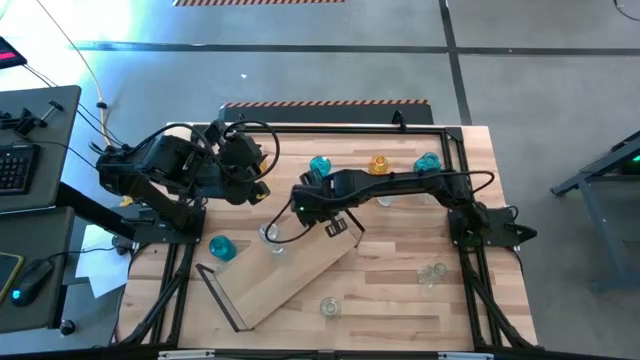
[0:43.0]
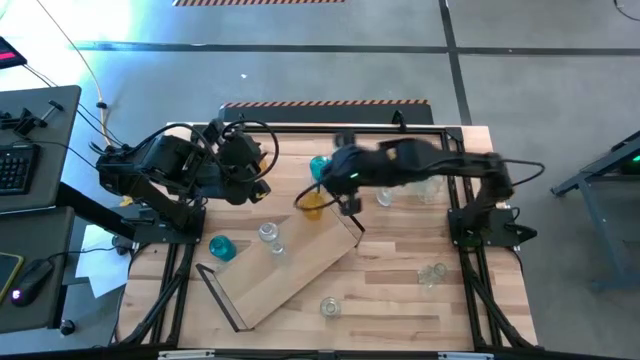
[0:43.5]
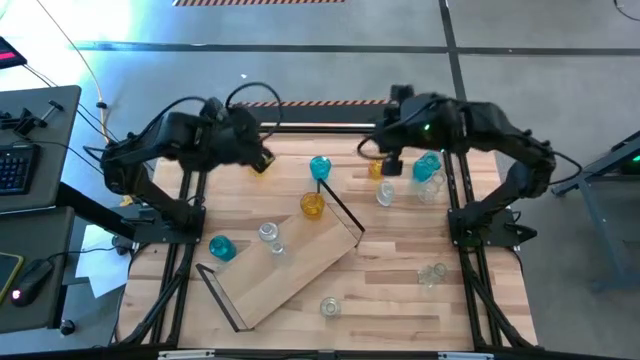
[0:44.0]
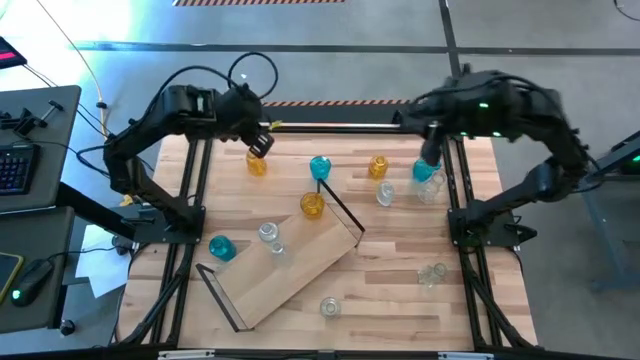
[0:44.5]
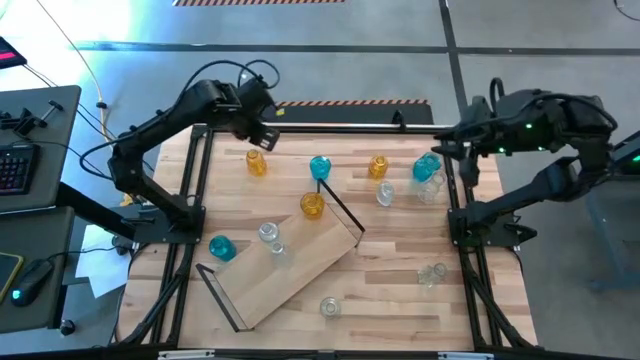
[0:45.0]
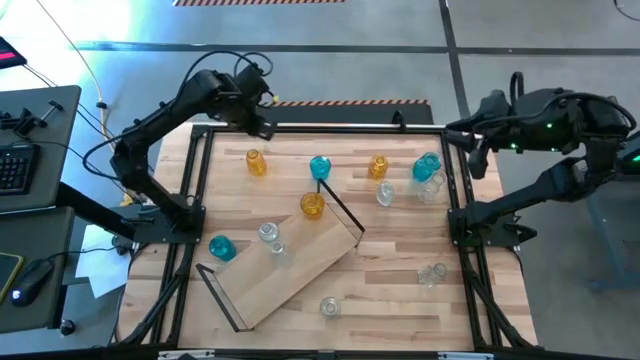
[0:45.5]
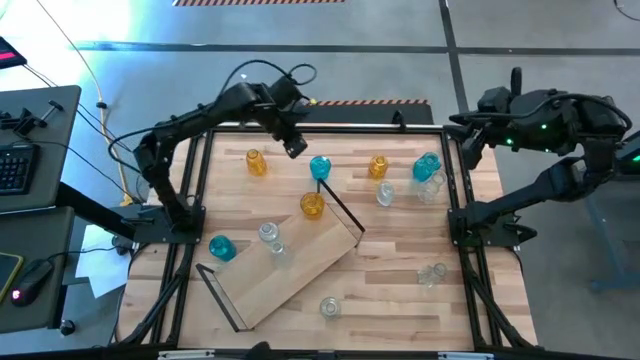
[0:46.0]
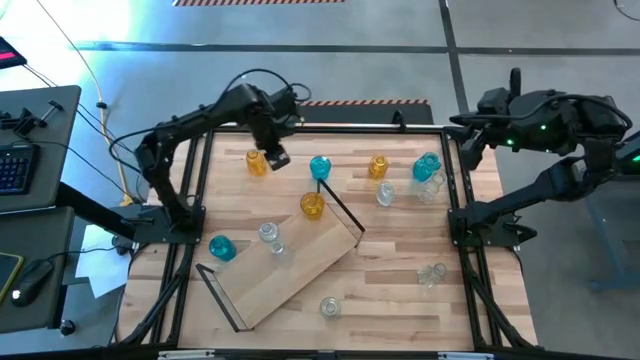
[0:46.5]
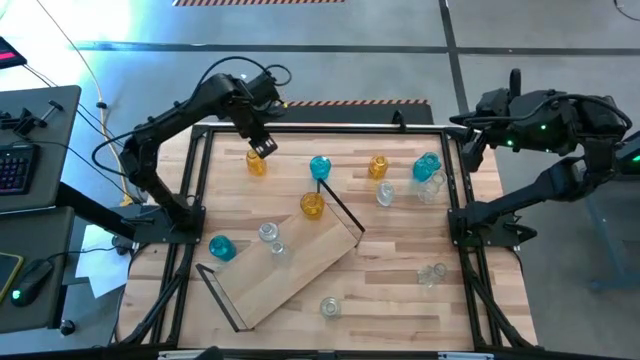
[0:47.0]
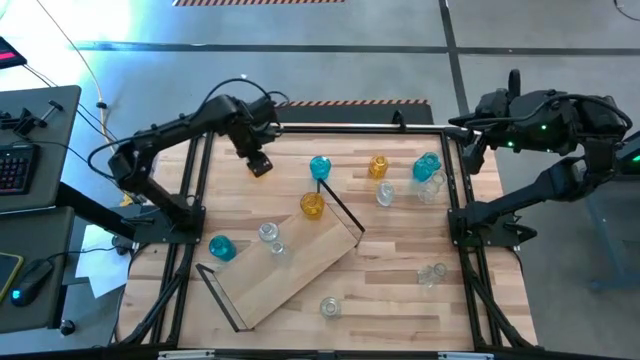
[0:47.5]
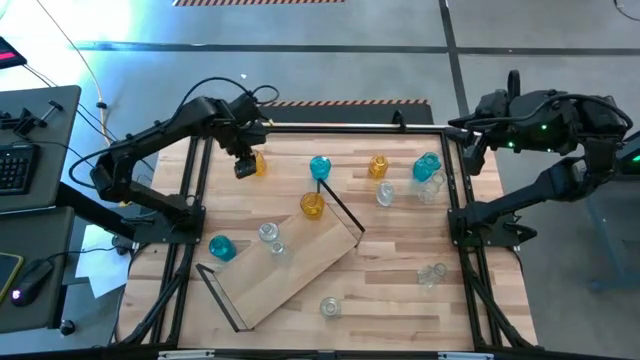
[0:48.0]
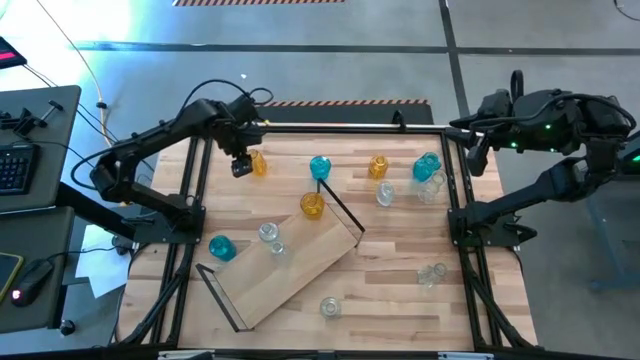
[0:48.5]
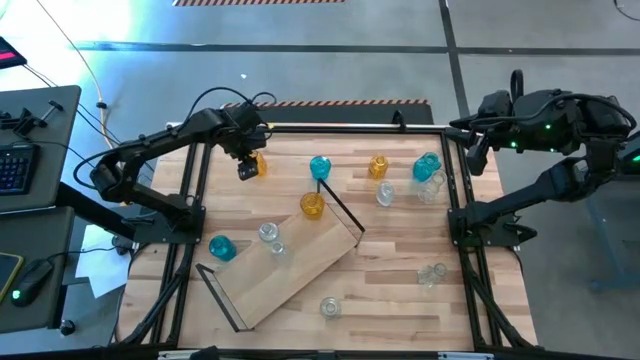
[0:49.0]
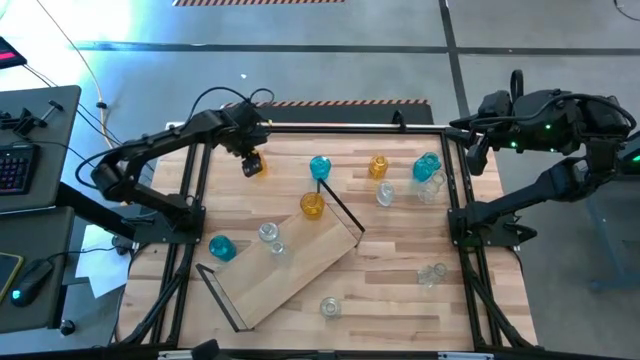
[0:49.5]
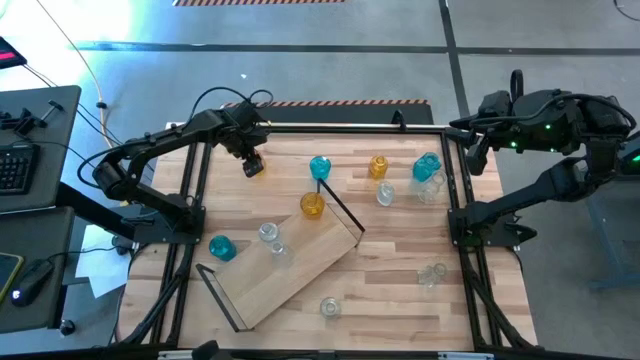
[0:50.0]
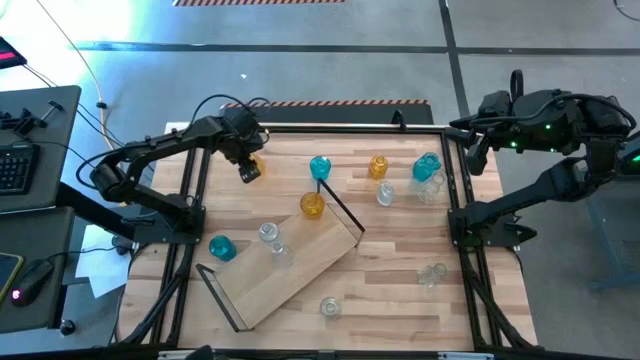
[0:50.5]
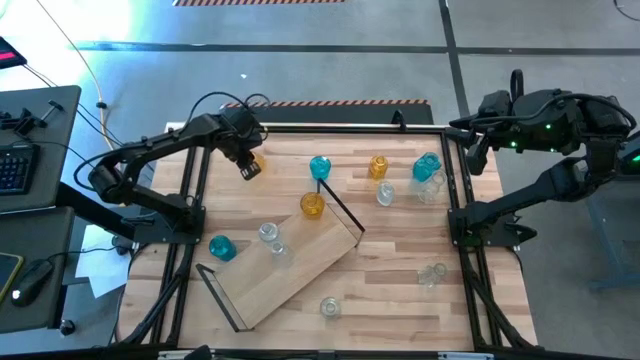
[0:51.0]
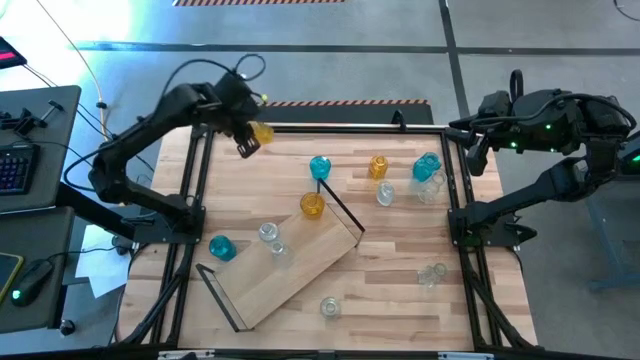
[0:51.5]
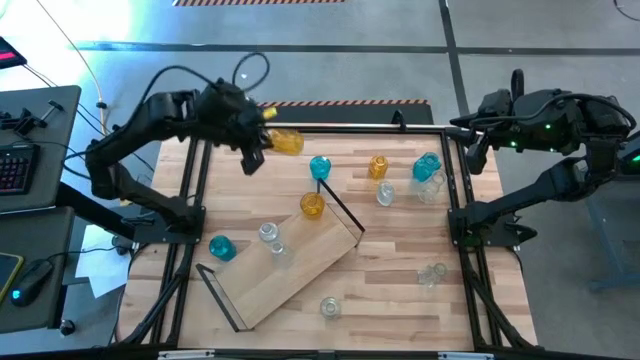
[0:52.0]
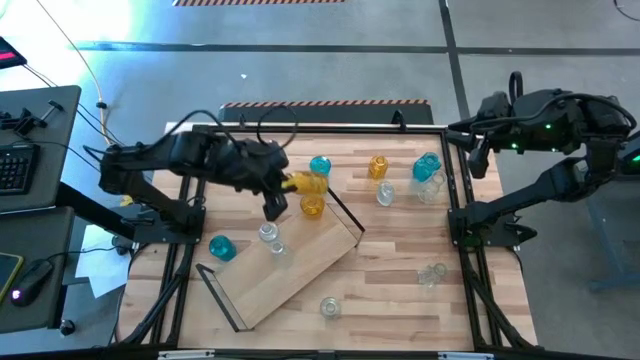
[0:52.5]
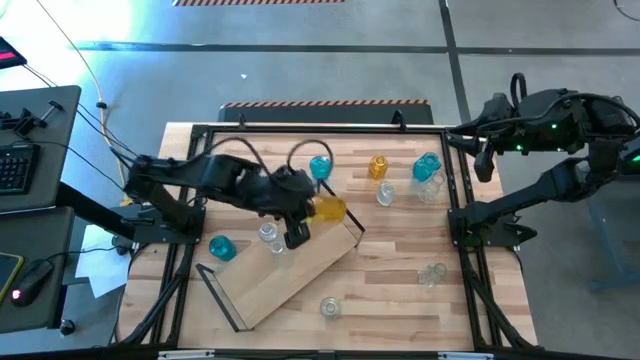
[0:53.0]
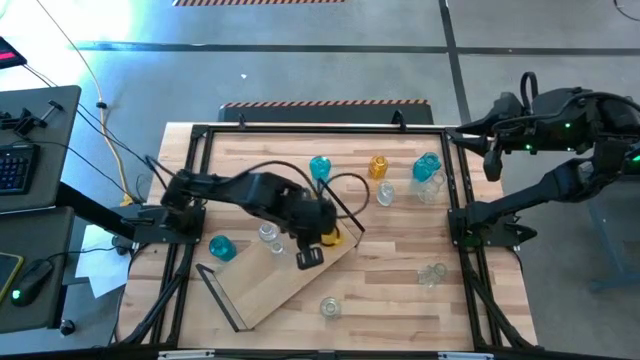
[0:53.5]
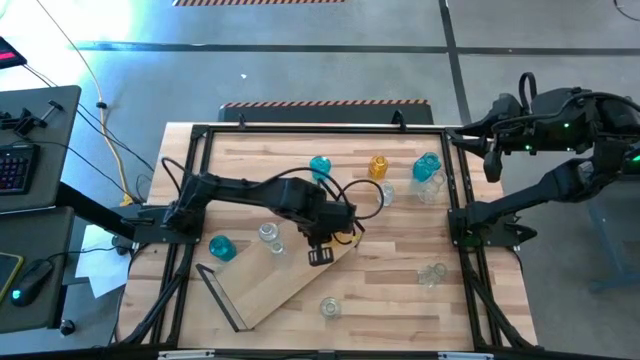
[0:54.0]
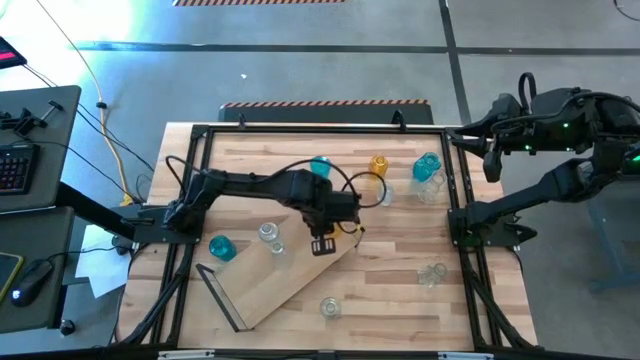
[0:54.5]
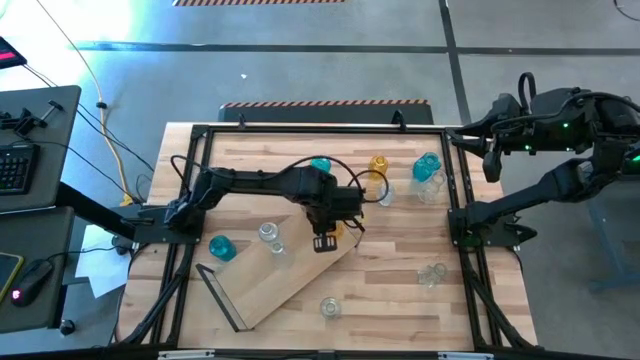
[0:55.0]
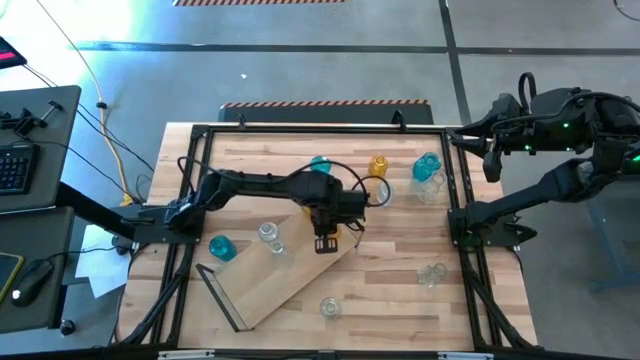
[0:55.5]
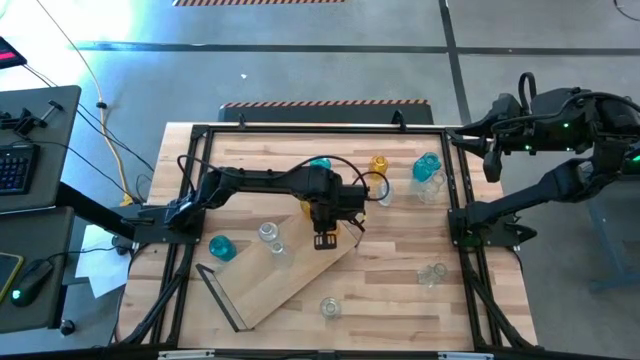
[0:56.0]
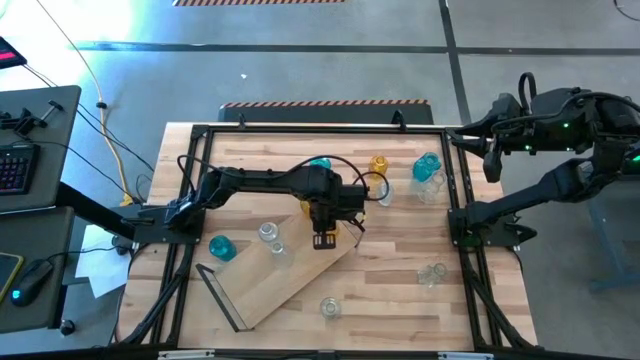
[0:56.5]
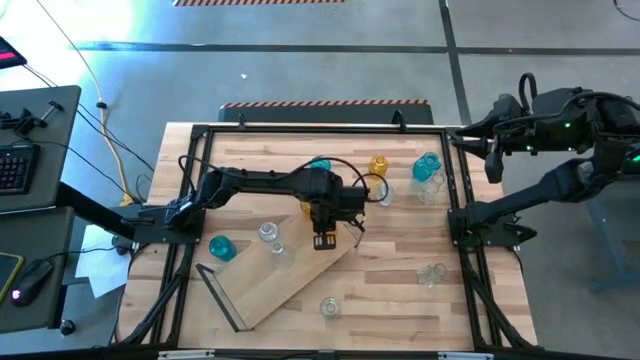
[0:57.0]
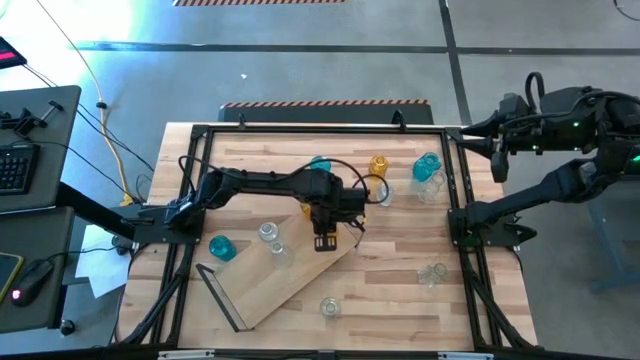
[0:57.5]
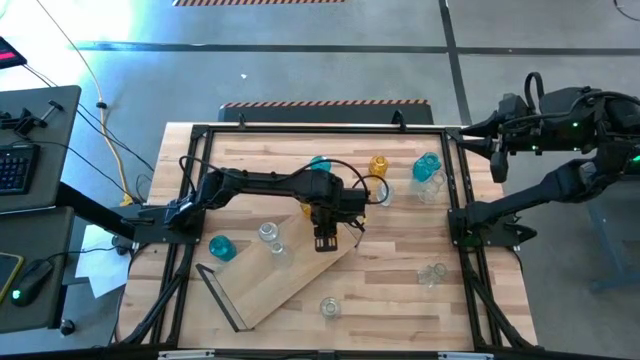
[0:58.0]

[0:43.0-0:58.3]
Task: sort vases onto shelf
Put the yellow vase on the shelf aligned with the other yellow vase

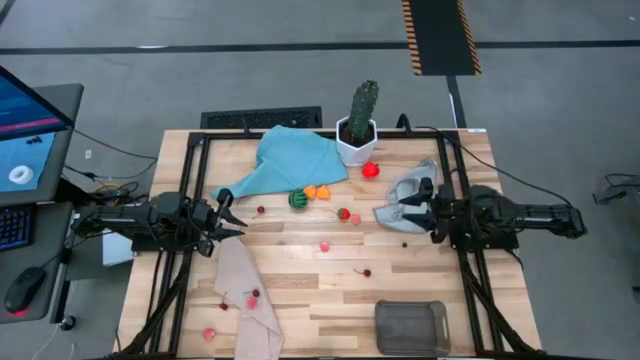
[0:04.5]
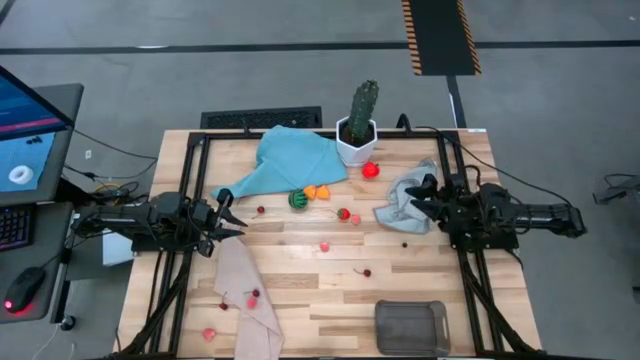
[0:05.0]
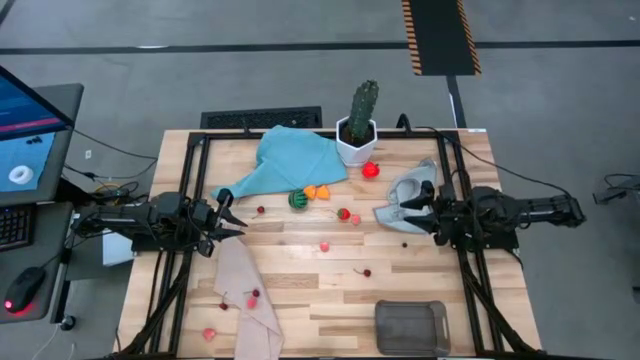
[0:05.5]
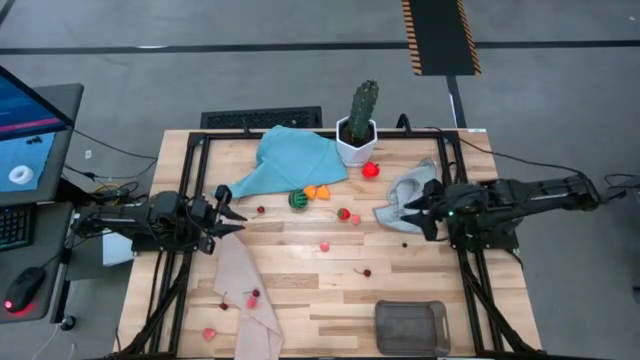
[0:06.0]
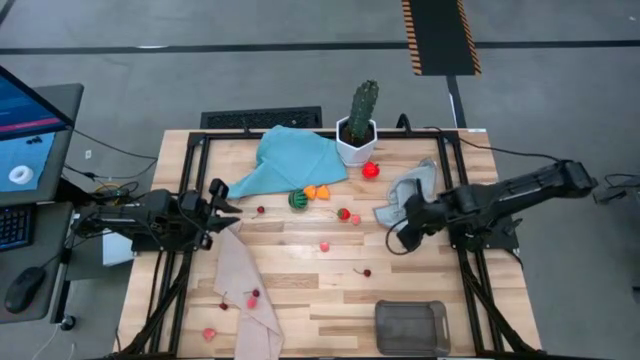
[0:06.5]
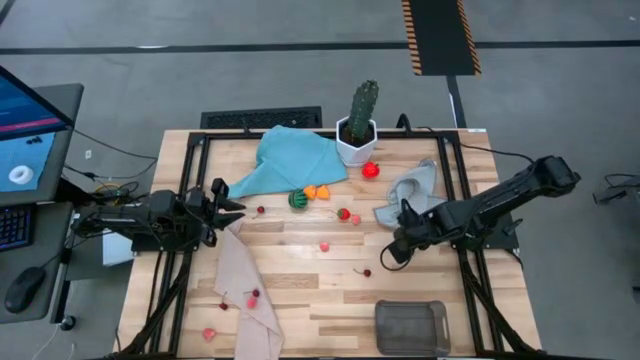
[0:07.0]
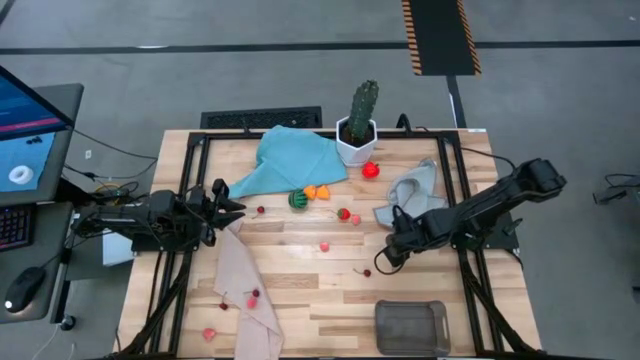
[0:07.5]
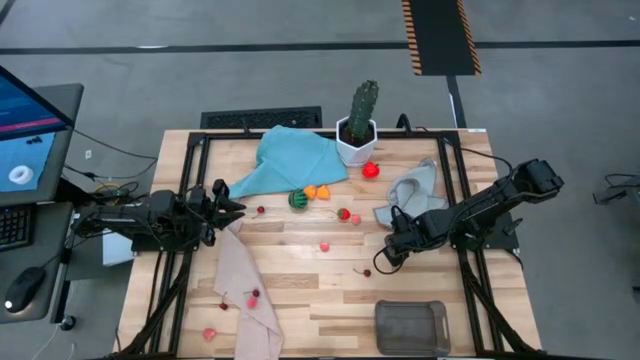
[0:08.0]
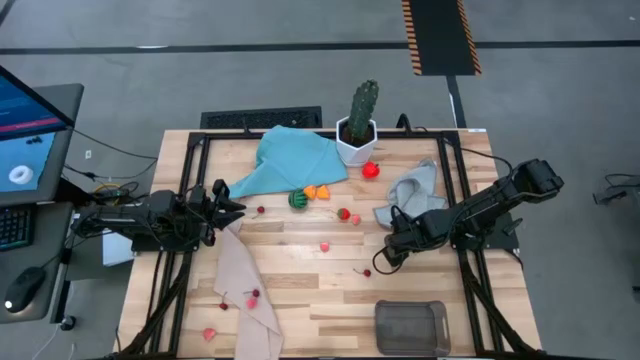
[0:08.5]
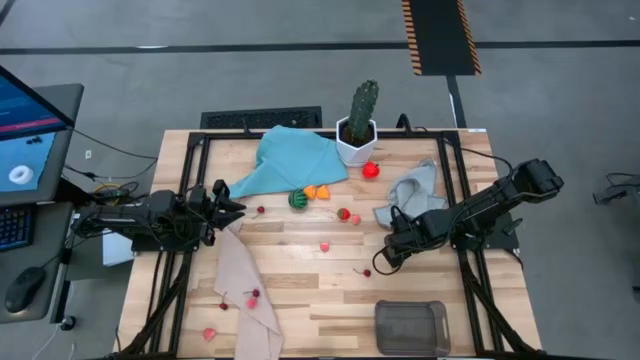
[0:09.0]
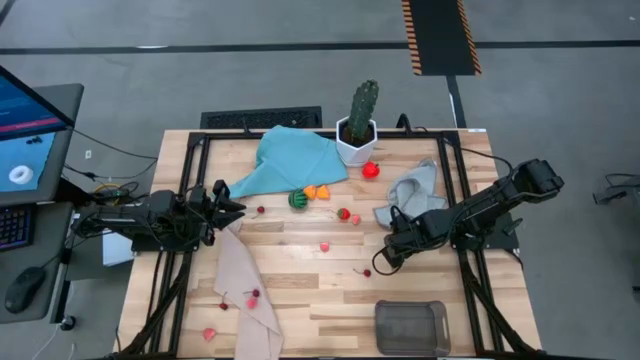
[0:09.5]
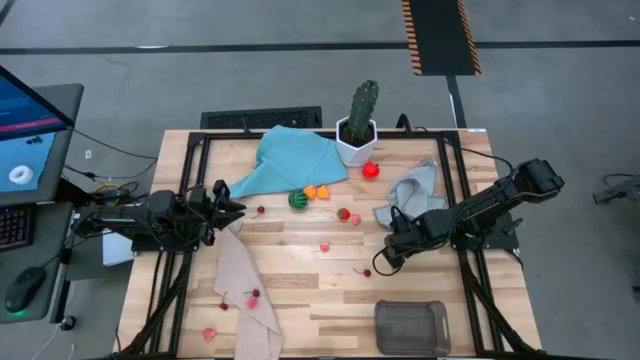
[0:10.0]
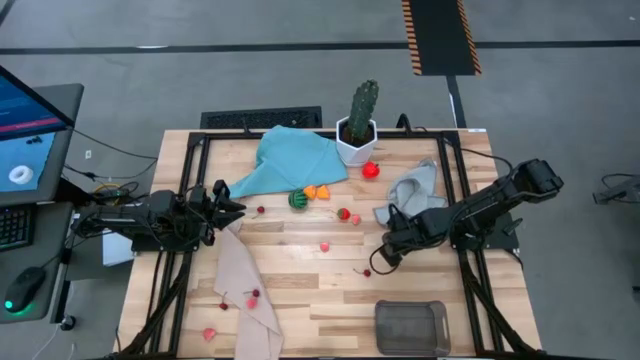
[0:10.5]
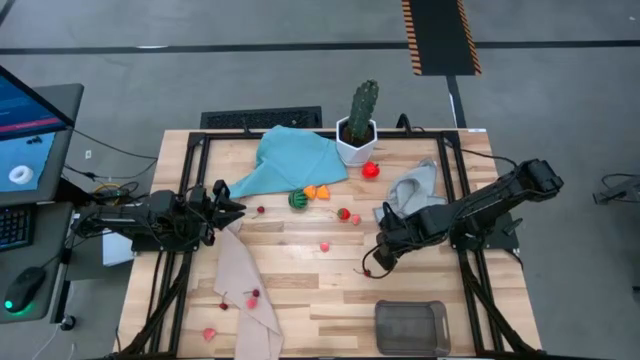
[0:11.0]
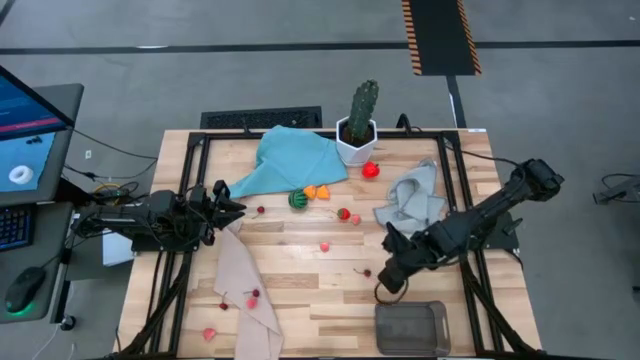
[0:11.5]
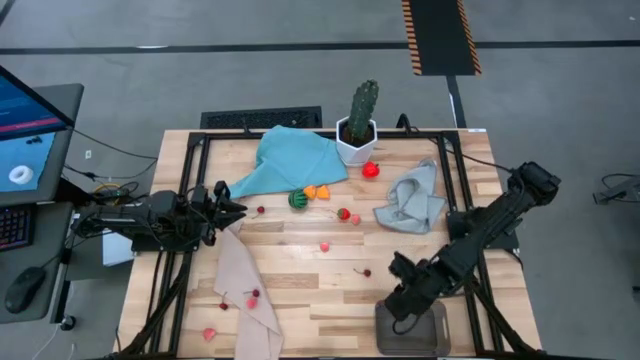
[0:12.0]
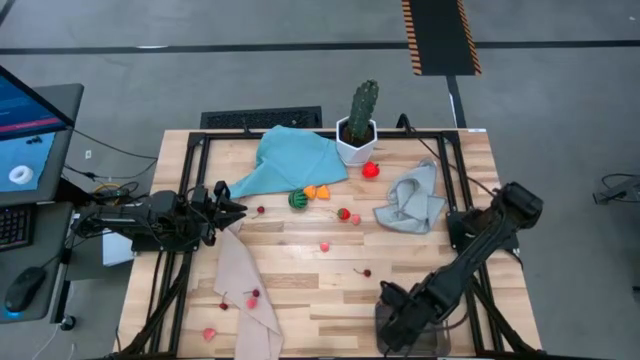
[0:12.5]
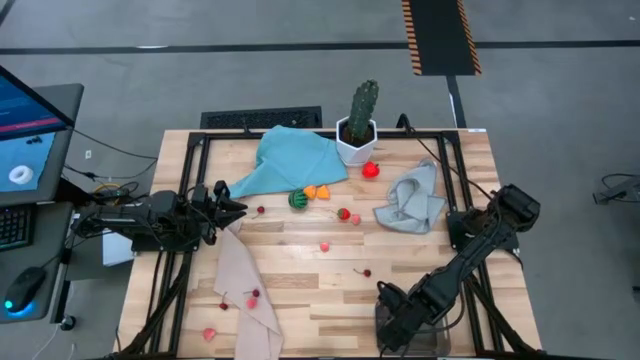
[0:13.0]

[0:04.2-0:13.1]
Task: Pick and placing Produce into tupperware
Put the blueberry into the black bin
